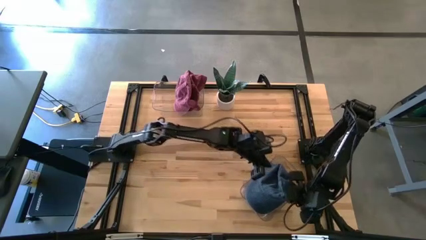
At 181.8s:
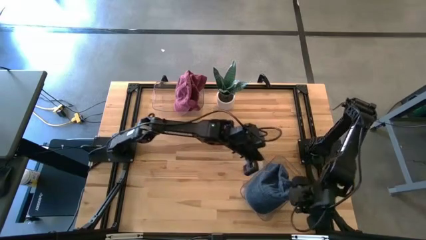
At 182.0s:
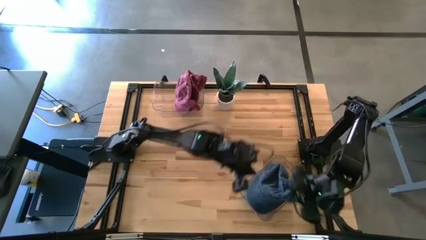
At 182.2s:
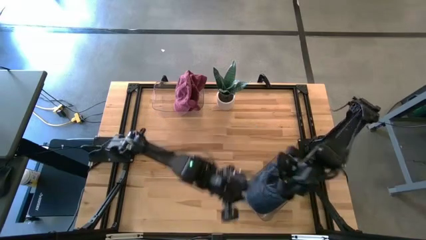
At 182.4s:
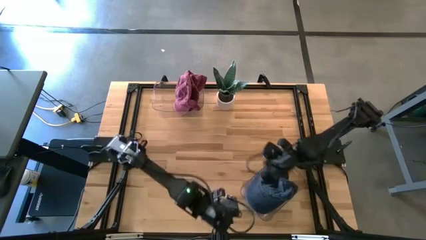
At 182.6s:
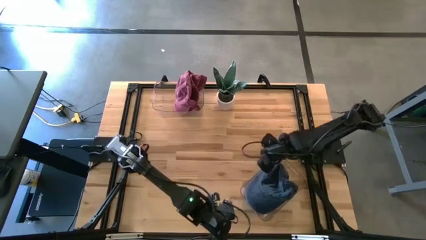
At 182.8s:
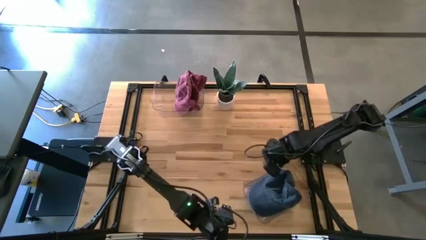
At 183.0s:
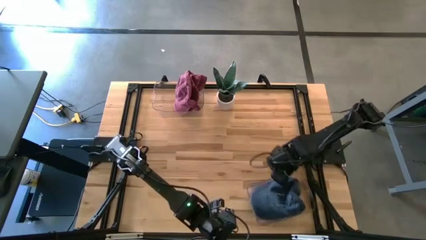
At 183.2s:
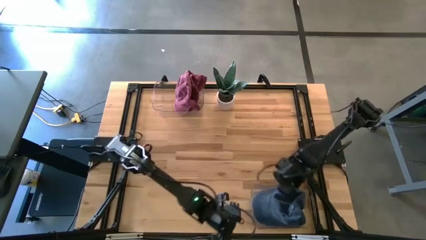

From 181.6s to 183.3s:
Task: Pick & Place hat
Adjust the bottom transparent bin

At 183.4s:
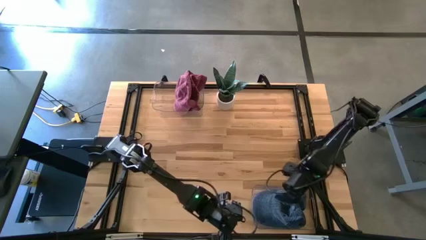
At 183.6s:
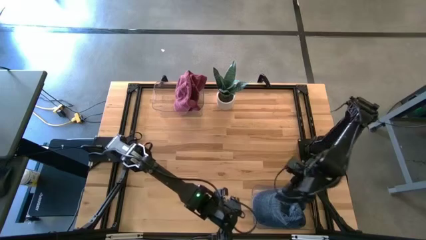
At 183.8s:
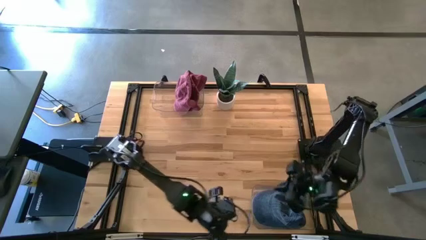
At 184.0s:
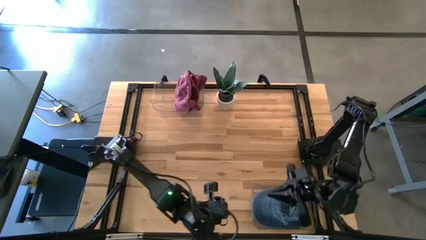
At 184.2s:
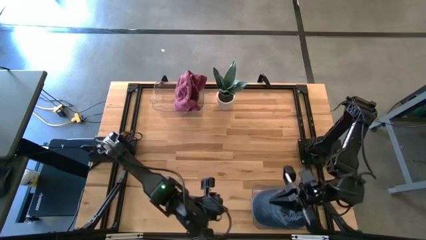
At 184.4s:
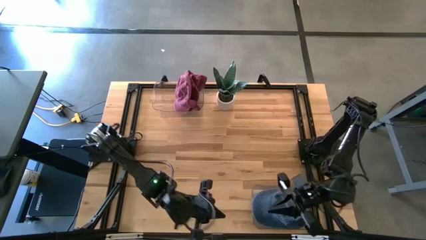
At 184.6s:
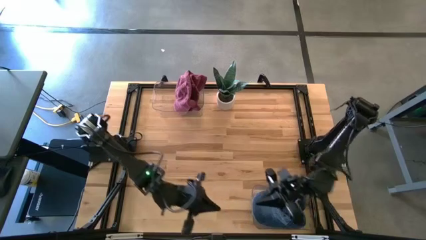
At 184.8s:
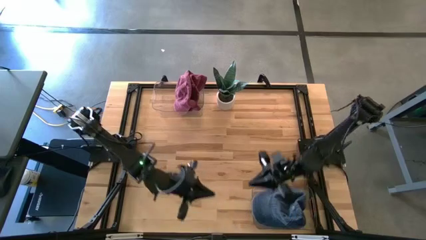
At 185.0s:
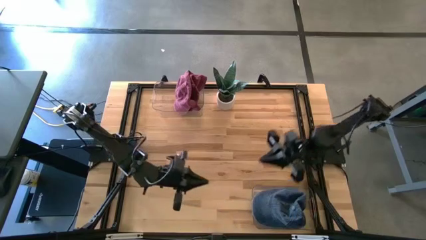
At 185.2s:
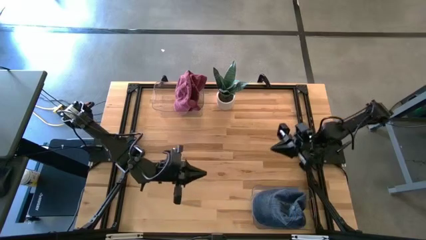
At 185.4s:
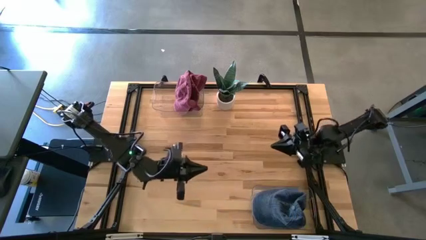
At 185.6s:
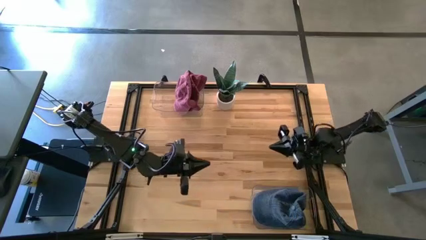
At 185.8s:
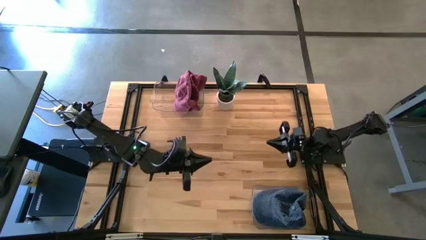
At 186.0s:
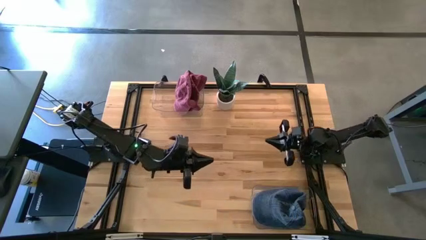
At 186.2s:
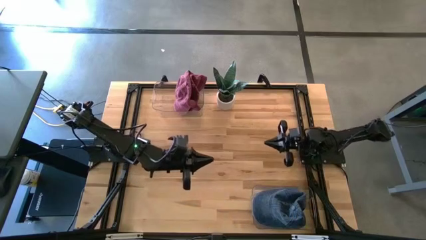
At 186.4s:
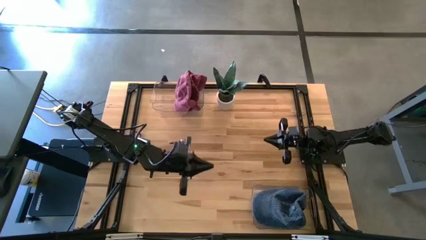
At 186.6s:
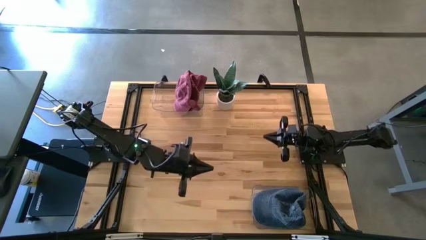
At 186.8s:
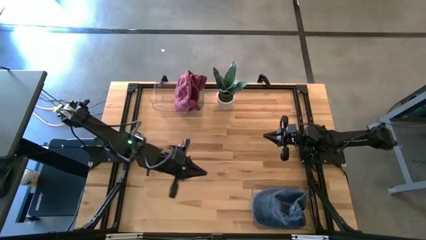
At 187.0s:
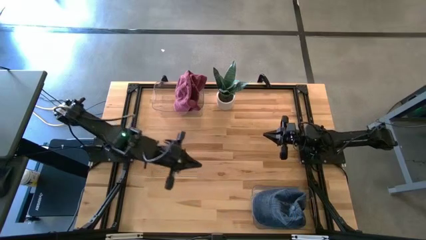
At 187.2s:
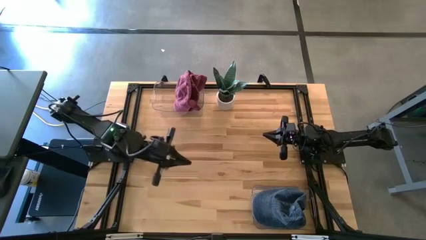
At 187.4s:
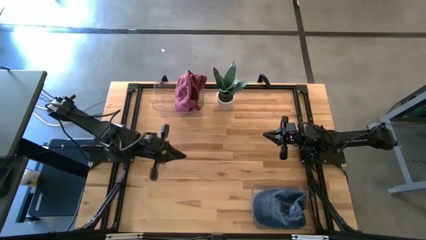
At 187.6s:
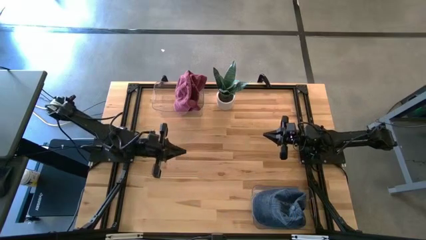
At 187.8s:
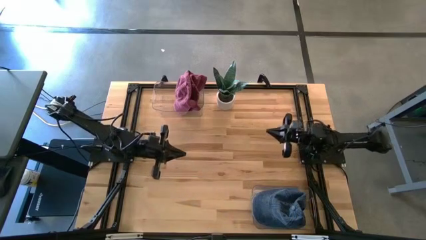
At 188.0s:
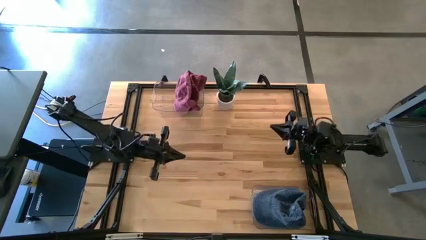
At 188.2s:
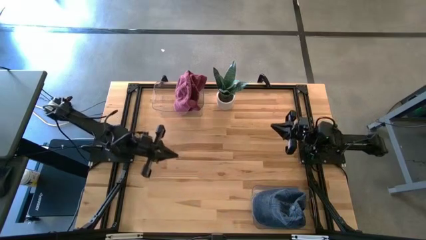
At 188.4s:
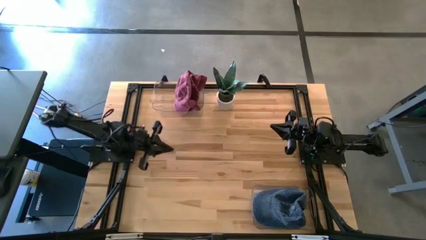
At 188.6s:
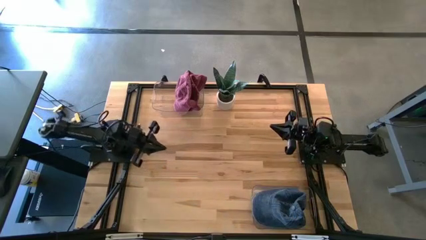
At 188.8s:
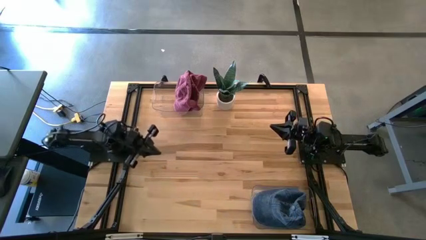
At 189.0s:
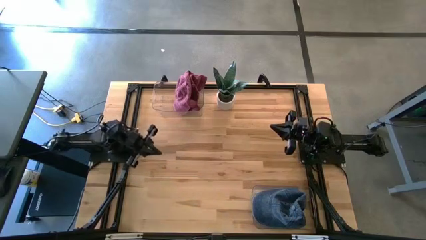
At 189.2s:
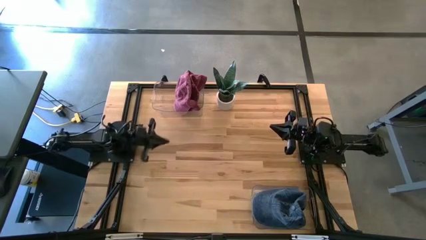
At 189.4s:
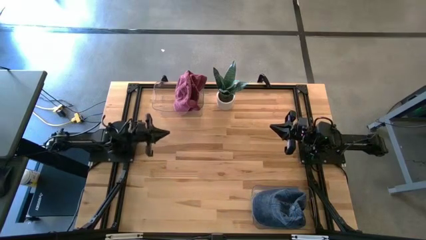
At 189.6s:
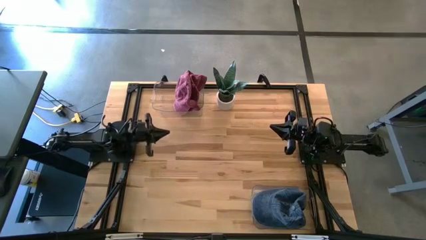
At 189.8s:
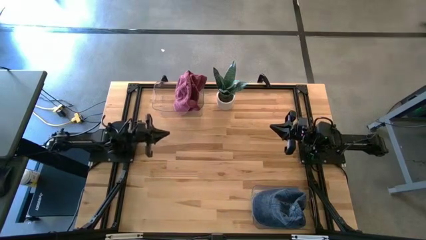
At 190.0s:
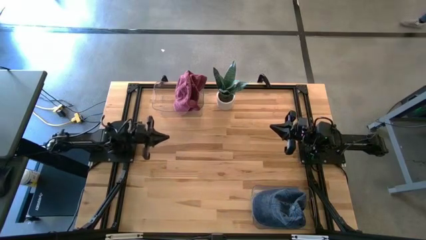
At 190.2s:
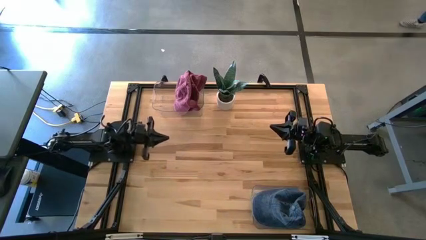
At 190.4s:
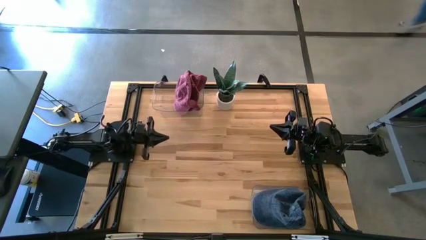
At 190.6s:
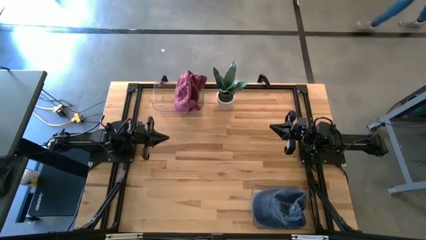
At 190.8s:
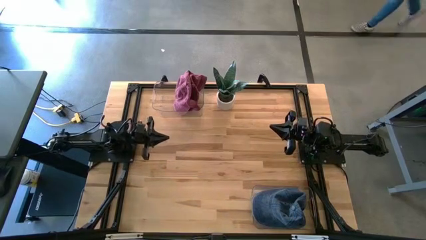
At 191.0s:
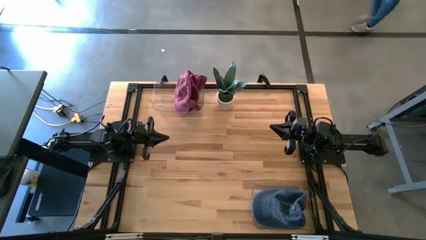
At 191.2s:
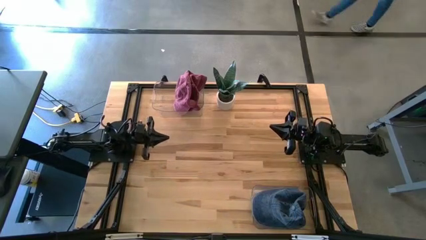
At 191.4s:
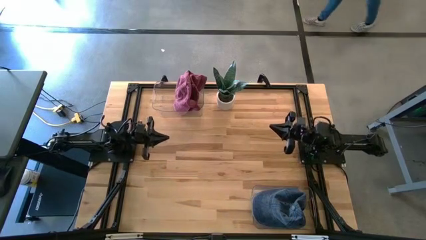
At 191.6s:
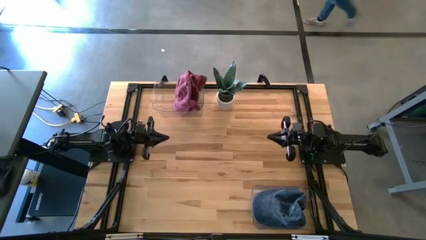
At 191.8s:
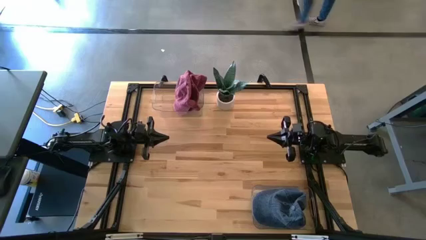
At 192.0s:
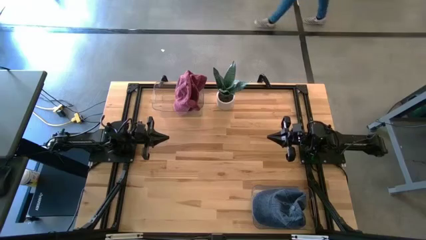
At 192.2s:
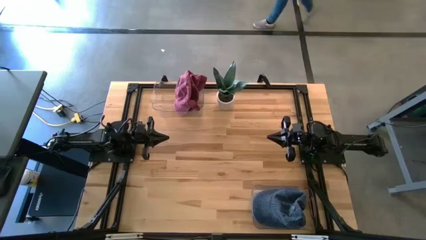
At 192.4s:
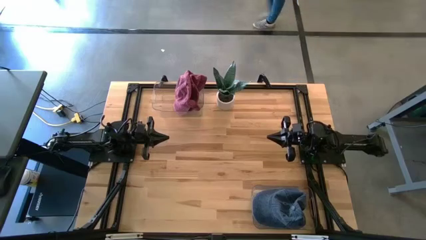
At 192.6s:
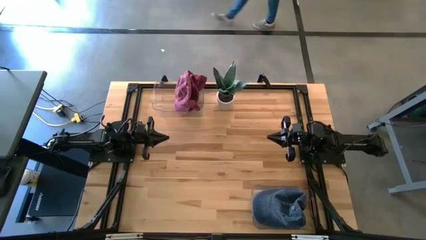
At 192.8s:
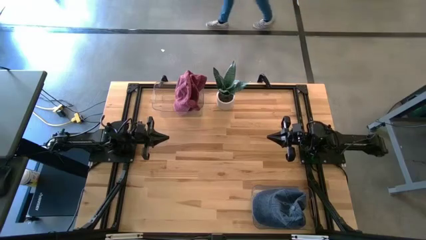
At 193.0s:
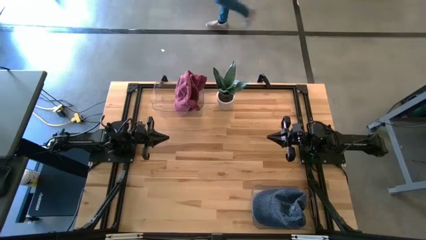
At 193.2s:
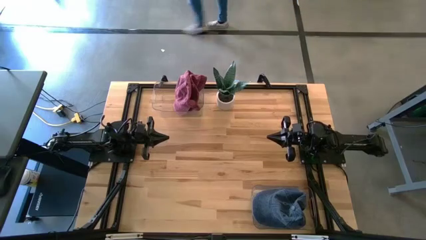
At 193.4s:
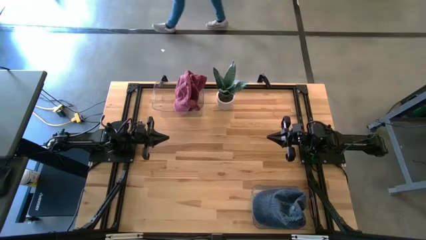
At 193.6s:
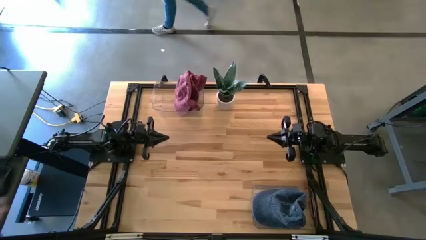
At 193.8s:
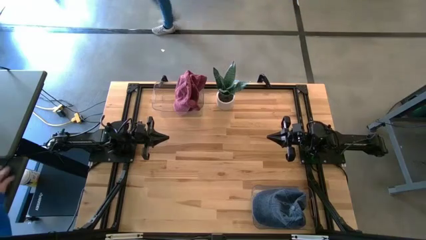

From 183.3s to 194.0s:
Return to Home Position

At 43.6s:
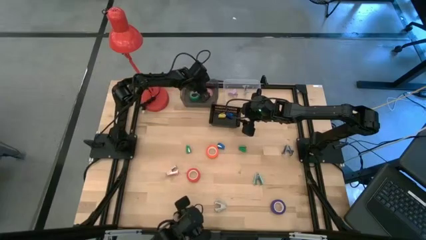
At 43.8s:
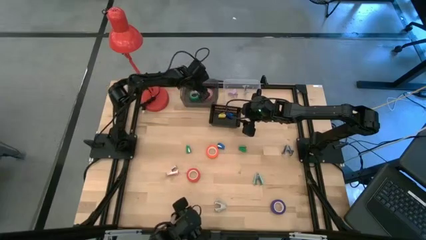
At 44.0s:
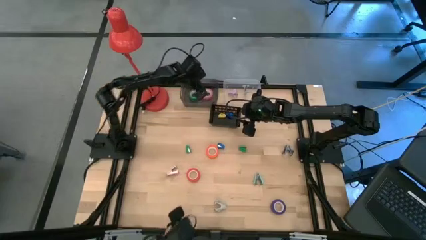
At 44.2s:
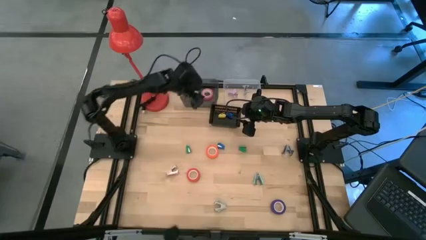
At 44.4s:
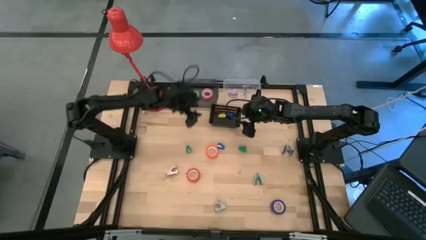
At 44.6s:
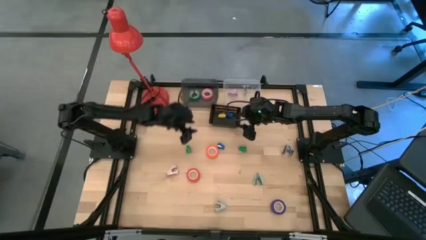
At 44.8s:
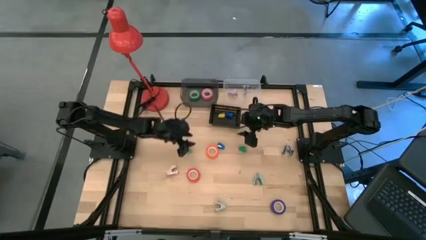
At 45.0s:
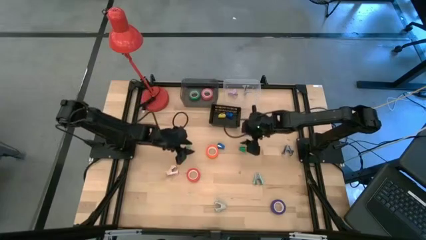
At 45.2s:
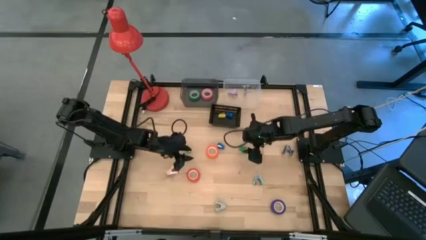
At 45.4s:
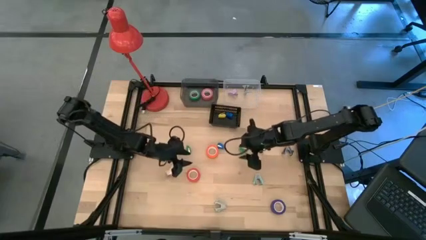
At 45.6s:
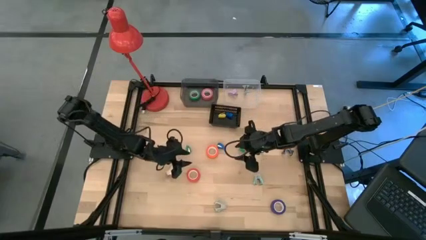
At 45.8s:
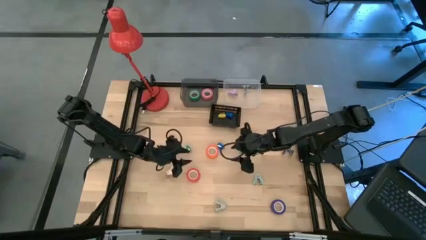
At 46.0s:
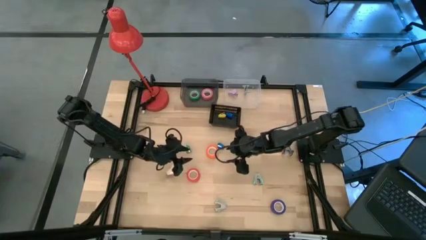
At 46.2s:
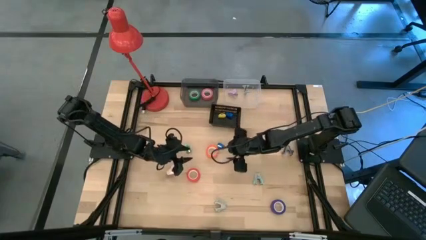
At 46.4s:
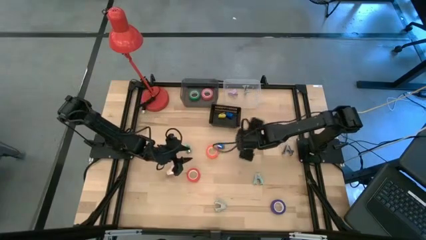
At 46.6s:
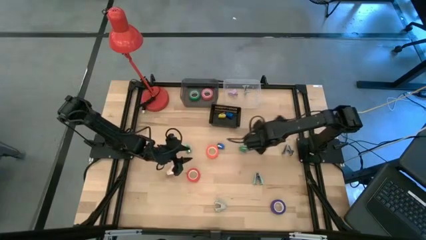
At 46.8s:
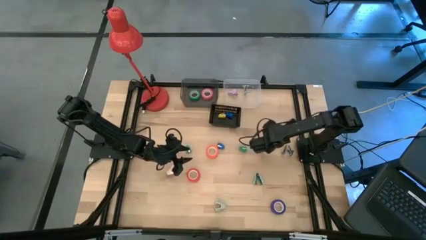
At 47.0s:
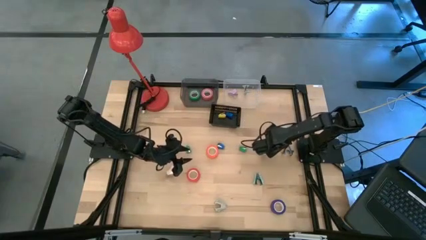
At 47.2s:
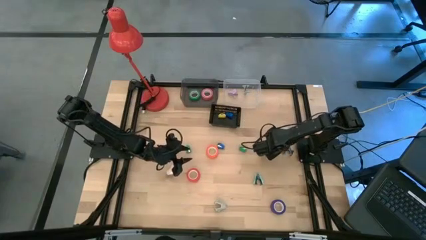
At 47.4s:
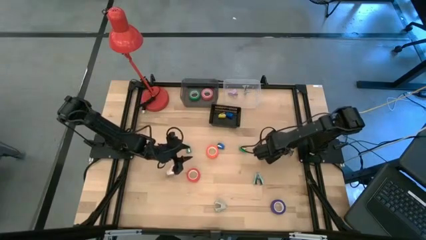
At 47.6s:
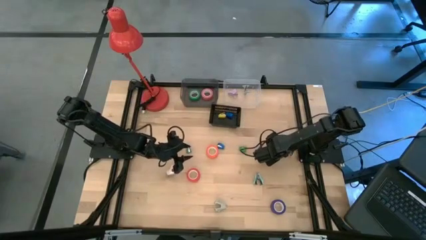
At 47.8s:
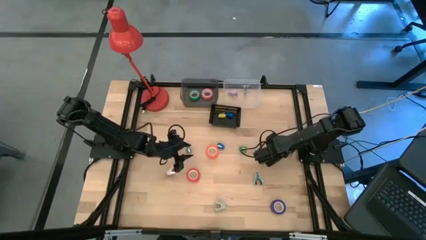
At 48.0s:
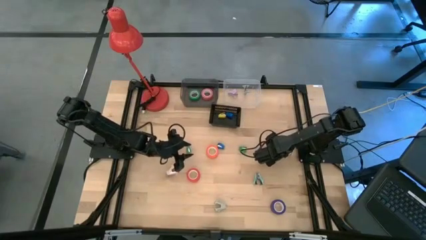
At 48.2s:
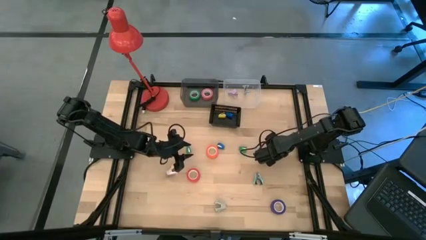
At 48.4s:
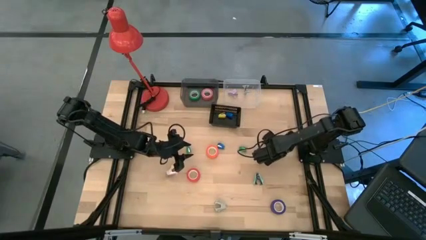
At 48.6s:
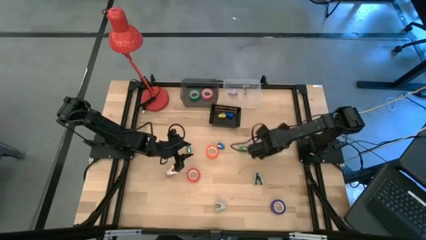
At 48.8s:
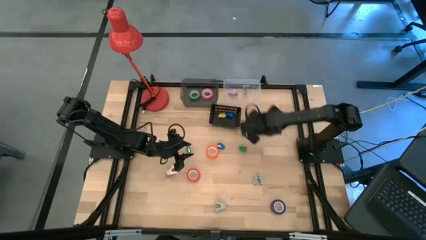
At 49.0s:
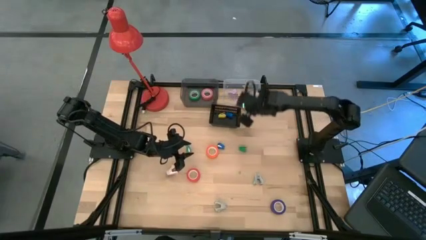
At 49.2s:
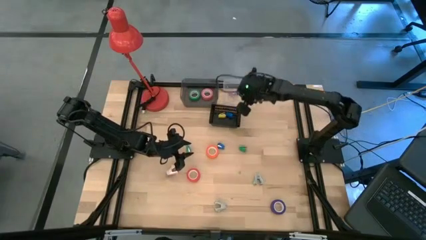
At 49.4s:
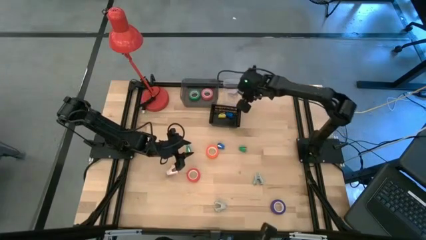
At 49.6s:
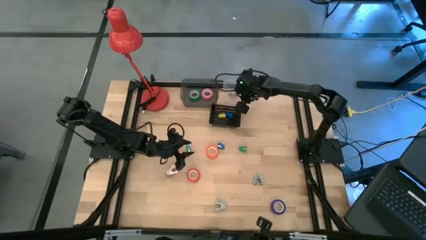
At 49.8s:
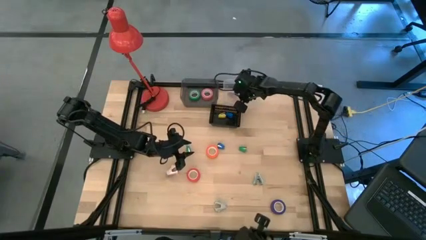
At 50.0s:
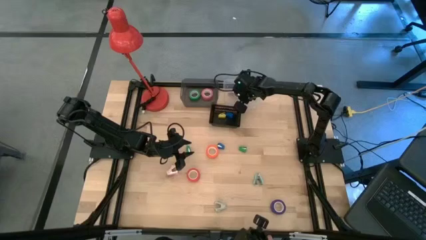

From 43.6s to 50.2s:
Task: Pick and place Stapler, Stapler remover, tape
Put the black staple remover into the transparent bin
